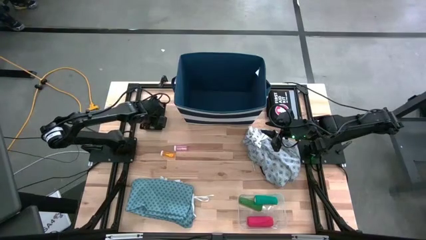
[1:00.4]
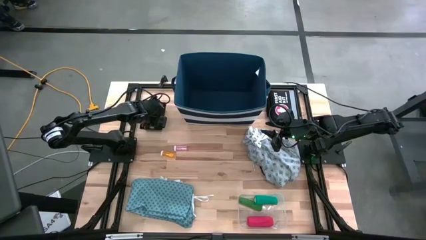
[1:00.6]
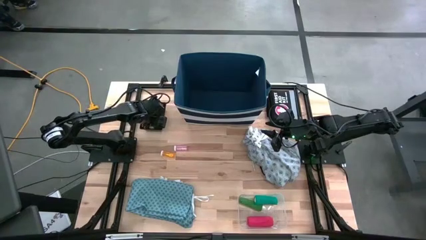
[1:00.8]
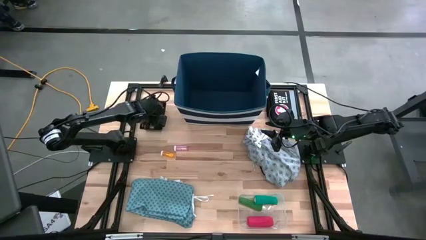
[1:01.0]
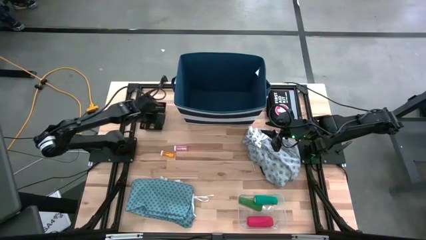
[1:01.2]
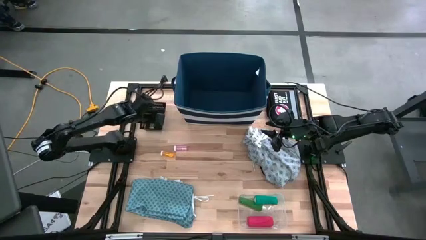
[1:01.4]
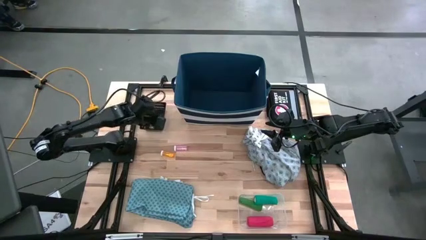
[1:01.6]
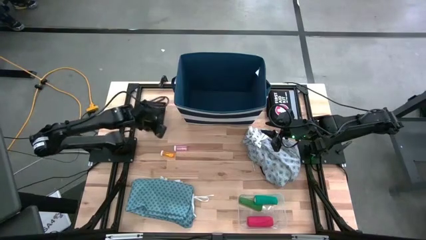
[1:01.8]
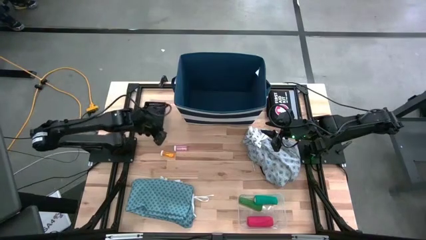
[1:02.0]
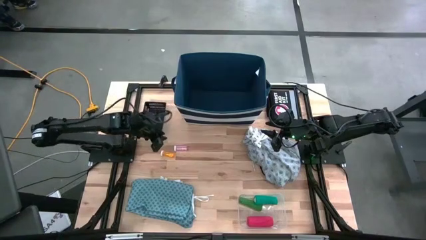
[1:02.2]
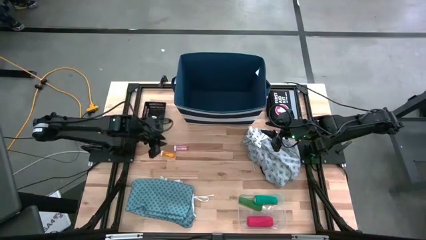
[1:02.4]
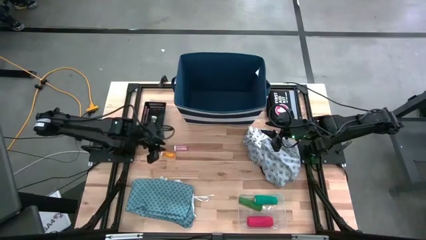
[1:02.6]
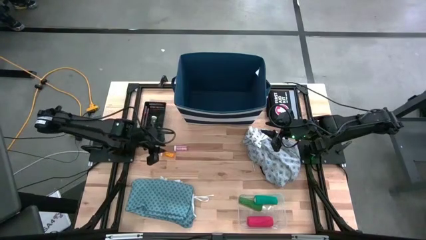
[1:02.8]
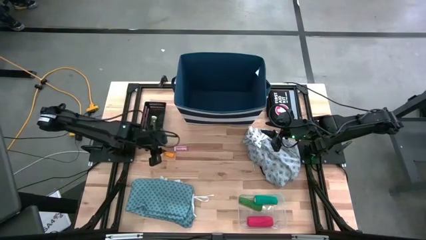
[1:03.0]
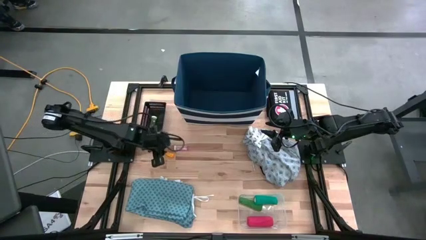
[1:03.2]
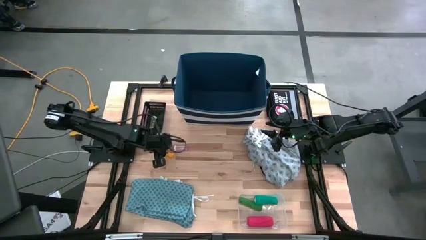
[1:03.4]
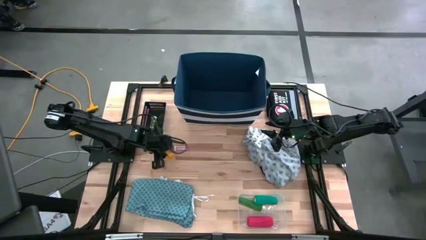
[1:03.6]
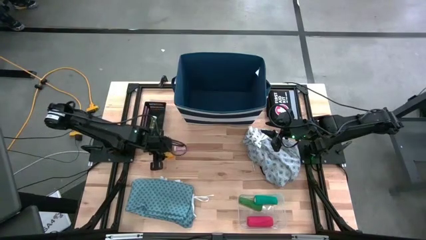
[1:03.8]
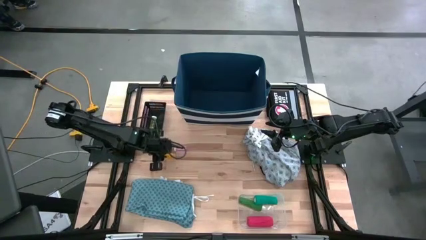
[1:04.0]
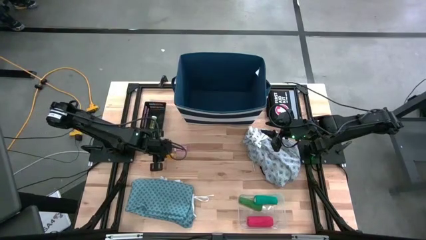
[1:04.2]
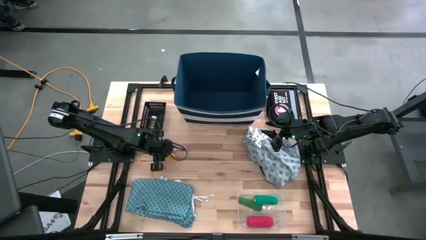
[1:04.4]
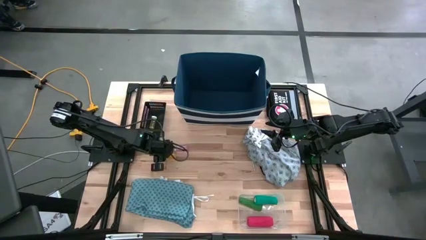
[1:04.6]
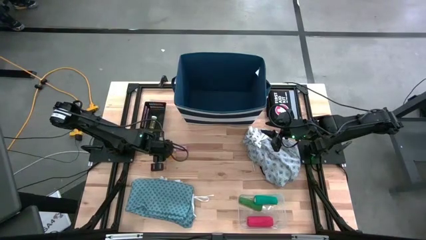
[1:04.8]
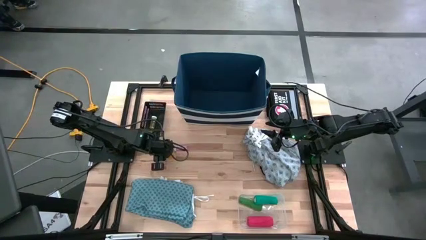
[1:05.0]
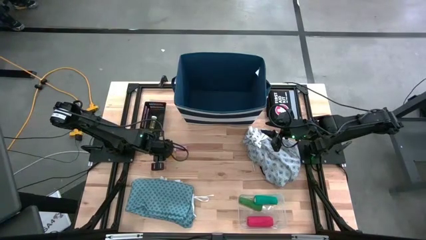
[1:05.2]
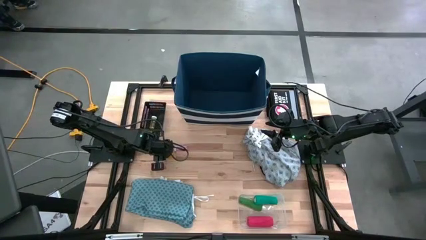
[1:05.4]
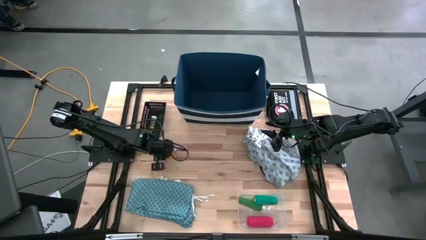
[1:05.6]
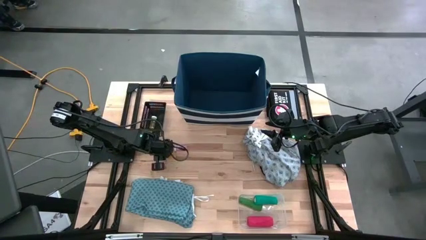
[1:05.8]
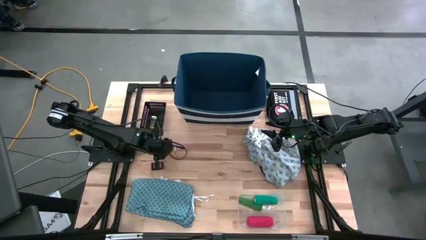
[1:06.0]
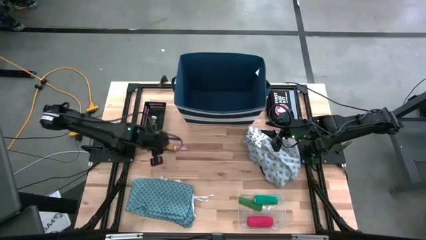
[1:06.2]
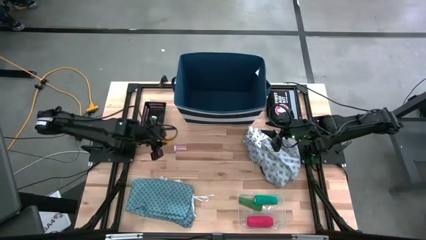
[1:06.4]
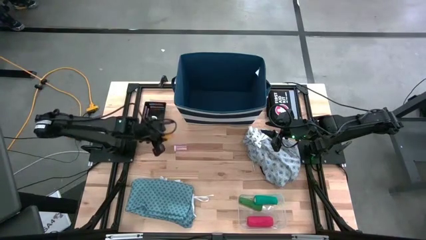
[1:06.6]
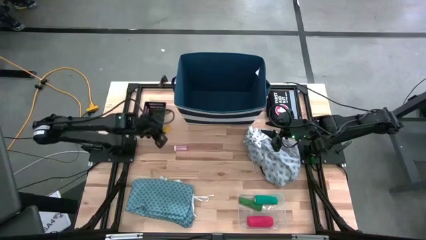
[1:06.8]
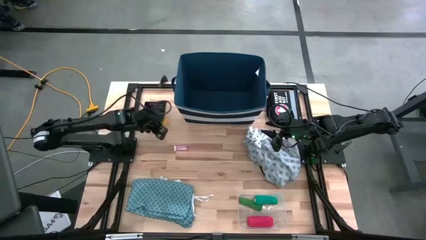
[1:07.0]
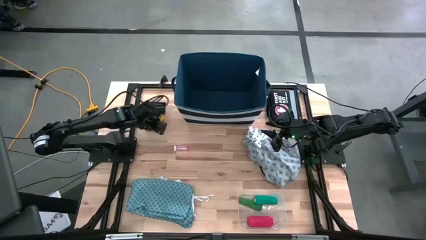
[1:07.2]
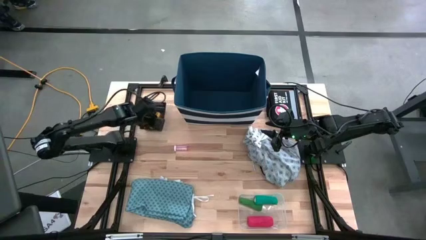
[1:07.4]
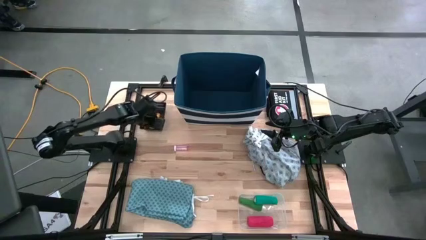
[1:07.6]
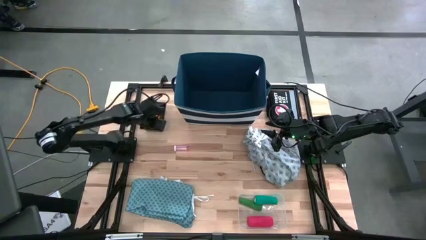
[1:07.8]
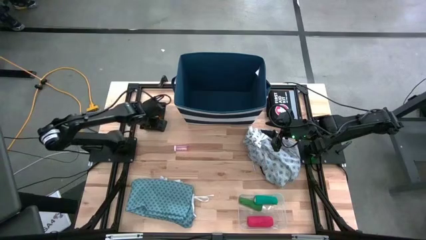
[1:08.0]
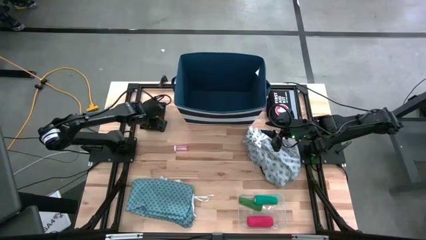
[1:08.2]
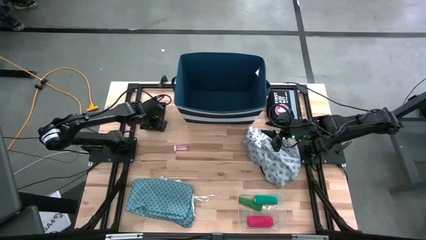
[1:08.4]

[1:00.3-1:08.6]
Task: Pick & Place Medicine items
Put the transparent orange medicine bottle into the black bin

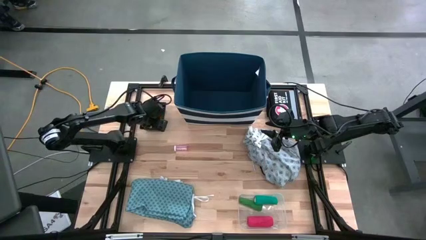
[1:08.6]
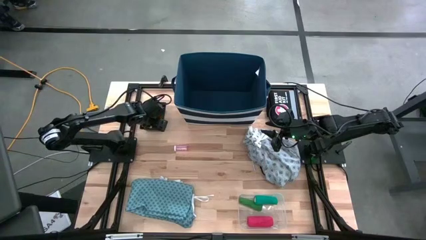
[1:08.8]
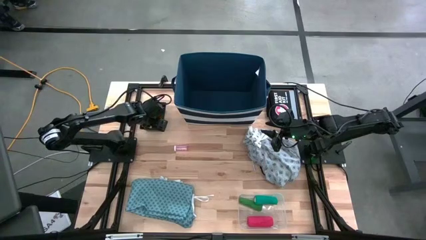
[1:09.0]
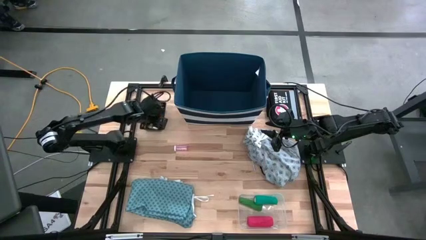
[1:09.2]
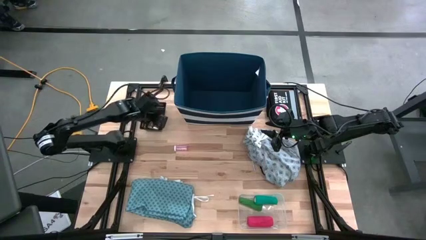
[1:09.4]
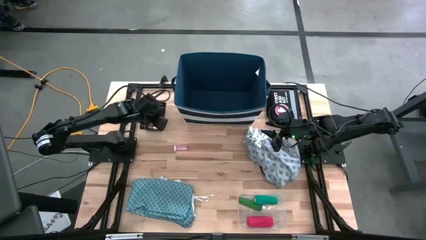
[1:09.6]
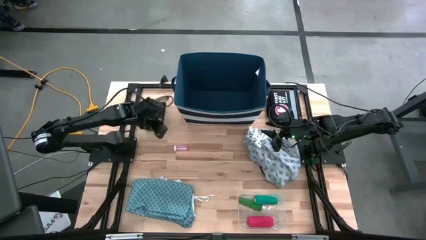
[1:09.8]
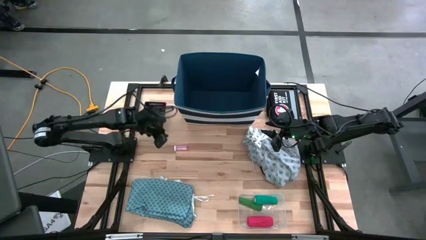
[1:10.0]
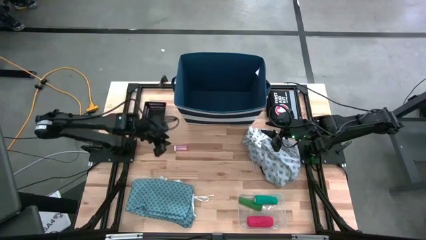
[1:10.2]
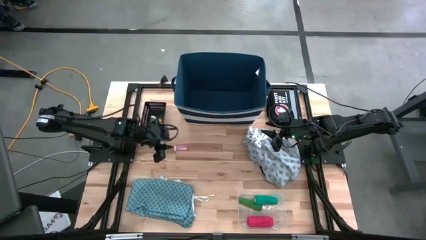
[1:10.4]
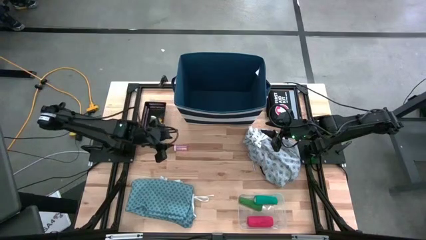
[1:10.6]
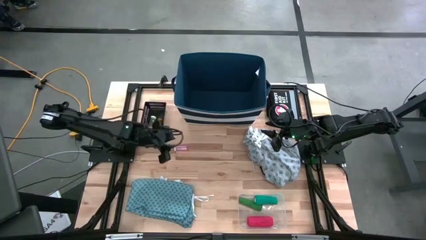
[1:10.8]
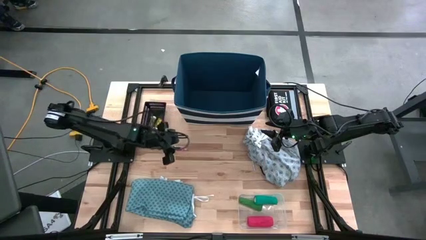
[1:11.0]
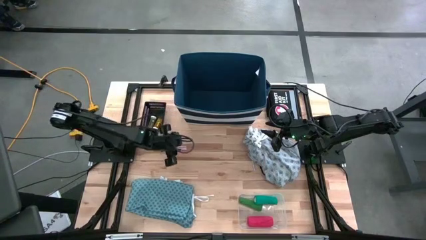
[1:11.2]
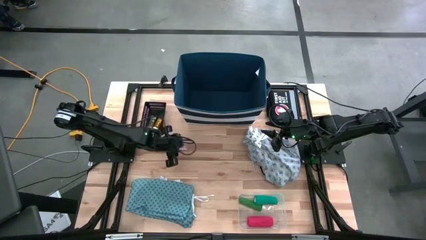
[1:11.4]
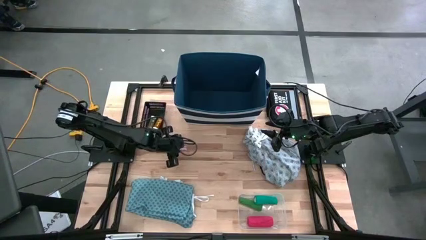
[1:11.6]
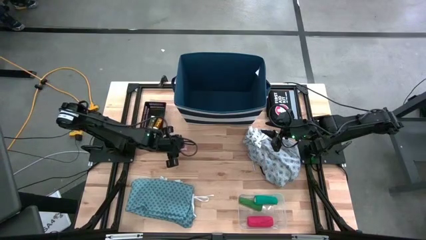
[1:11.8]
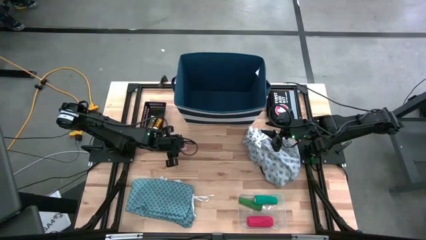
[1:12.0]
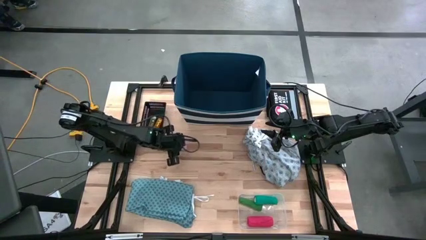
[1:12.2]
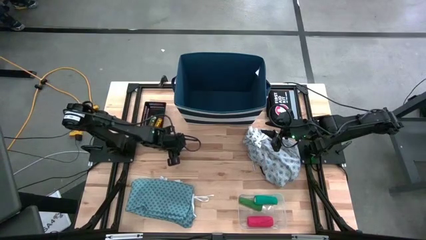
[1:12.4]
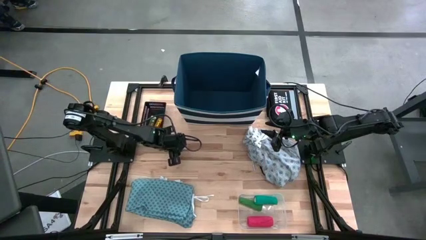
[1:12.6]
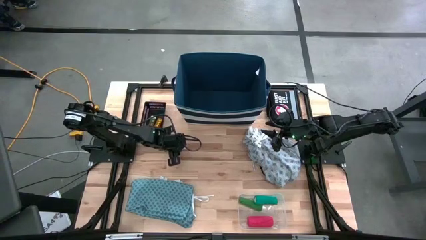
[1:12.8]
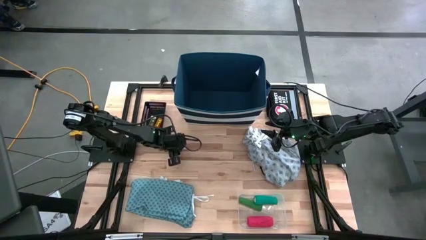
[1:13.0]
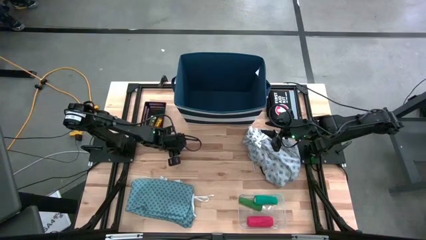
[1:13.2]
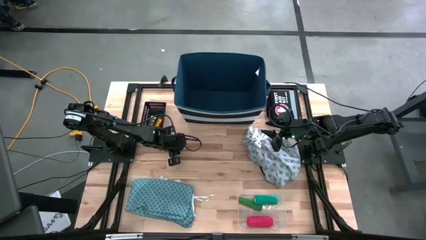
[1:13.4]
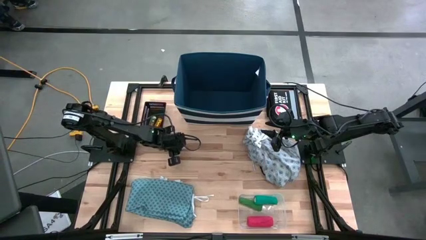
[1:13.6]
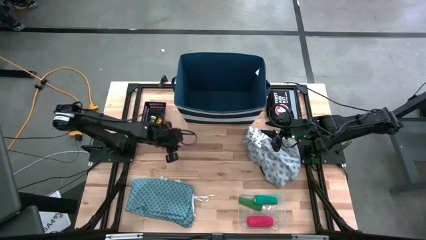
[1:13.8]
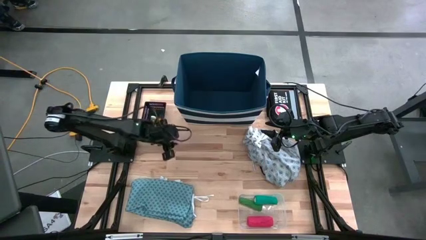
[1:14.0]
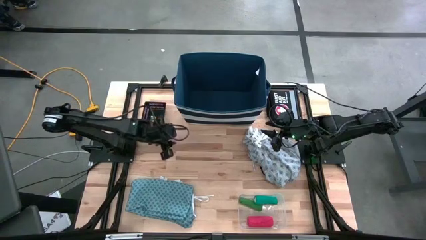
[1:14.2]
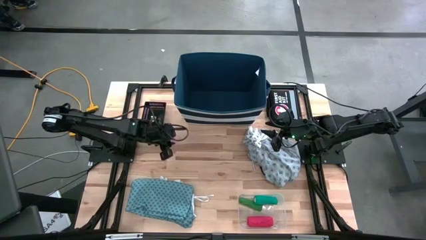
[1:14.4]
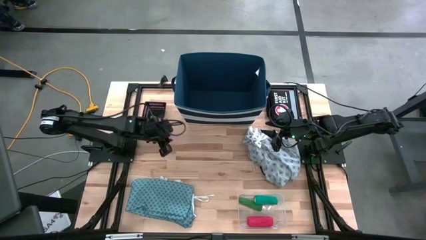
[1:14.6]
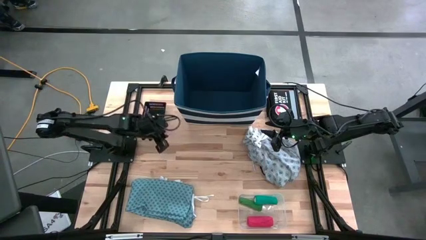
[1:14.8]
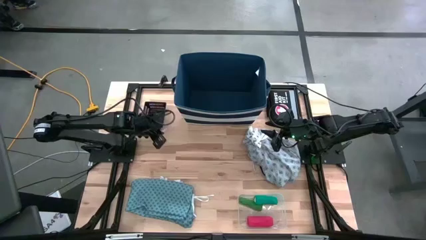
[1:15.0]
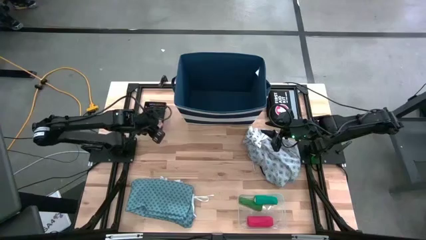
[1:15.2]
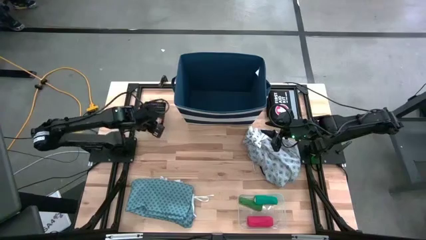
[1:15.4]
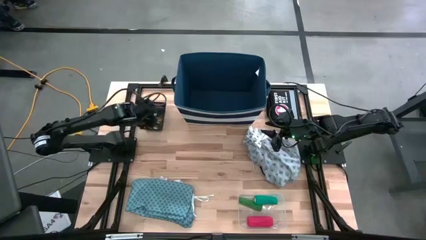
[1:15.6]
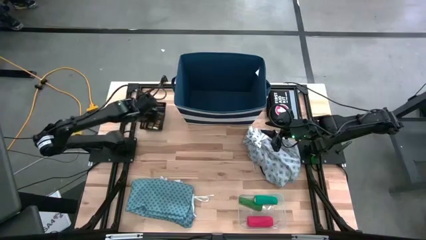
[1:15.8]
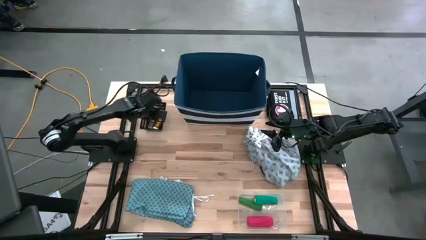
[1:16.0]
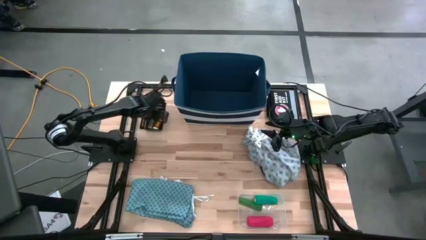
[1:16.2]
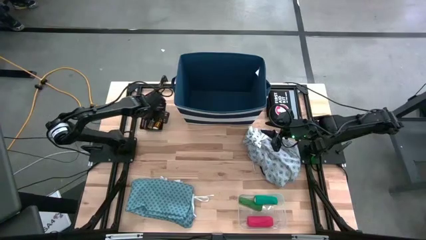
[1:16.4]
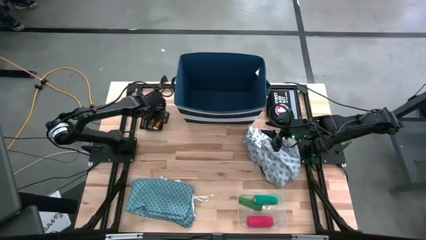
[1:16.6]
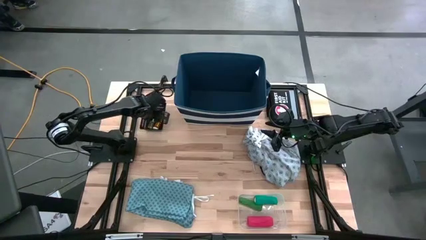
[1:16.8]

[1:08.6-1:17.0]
Put the transparent pink medicine bottle into the black bin
